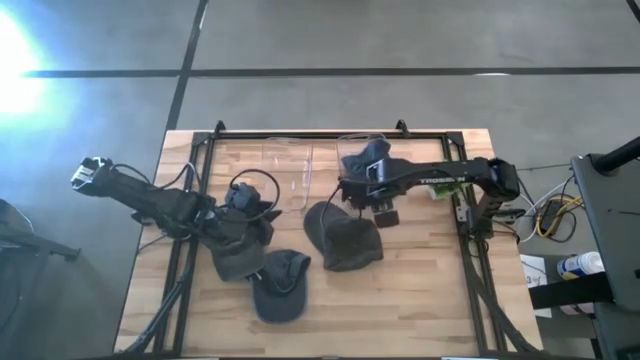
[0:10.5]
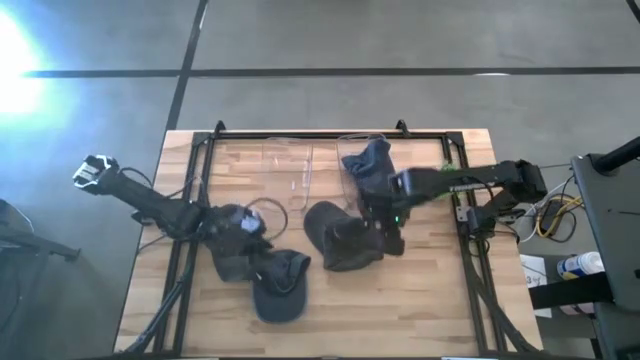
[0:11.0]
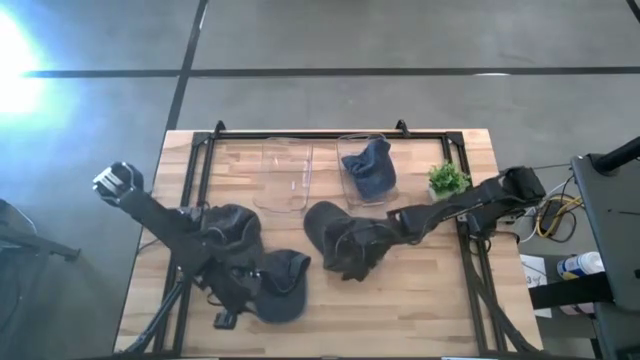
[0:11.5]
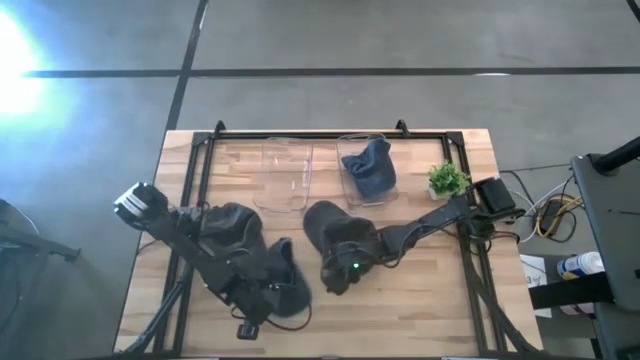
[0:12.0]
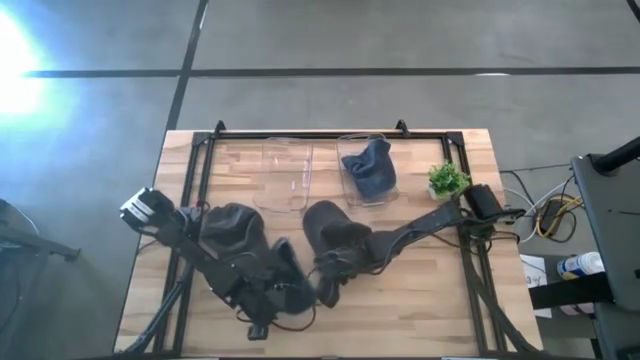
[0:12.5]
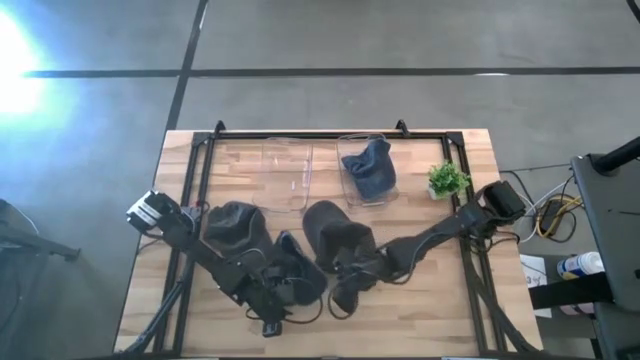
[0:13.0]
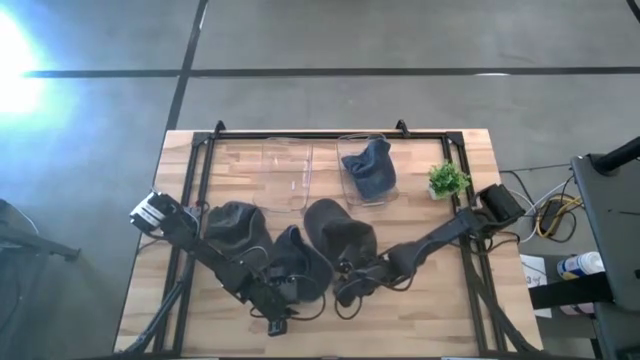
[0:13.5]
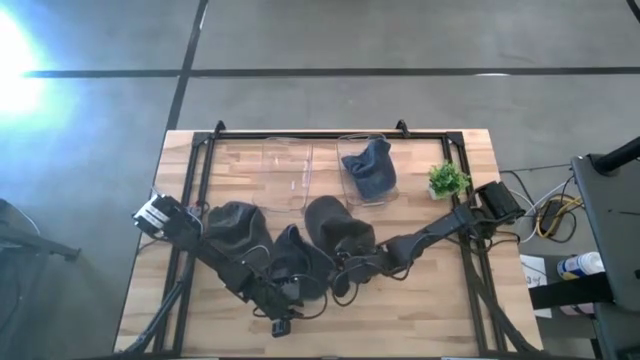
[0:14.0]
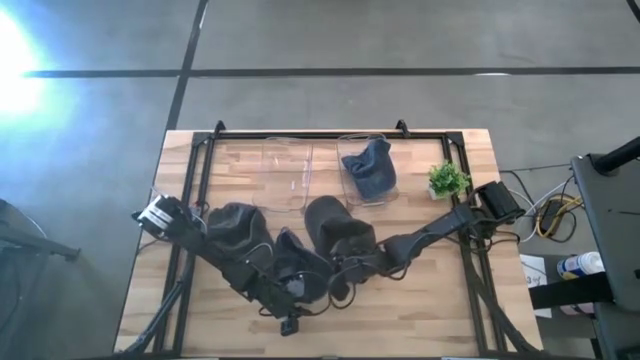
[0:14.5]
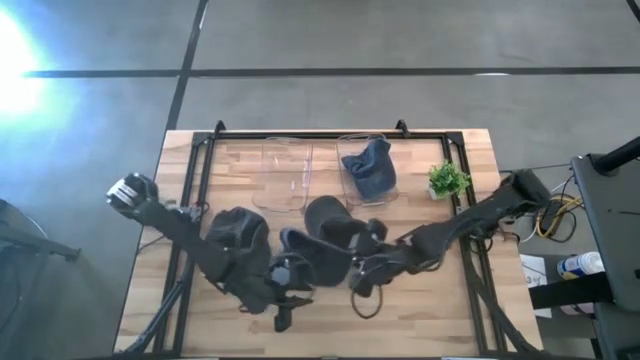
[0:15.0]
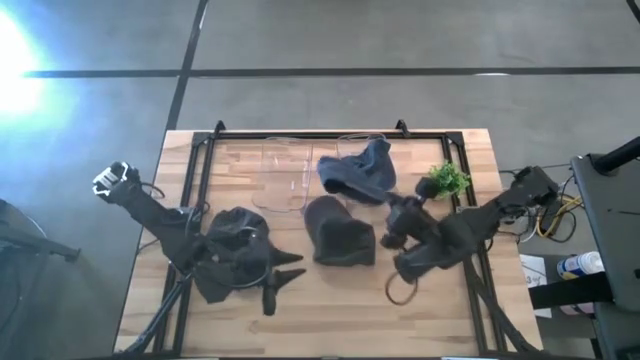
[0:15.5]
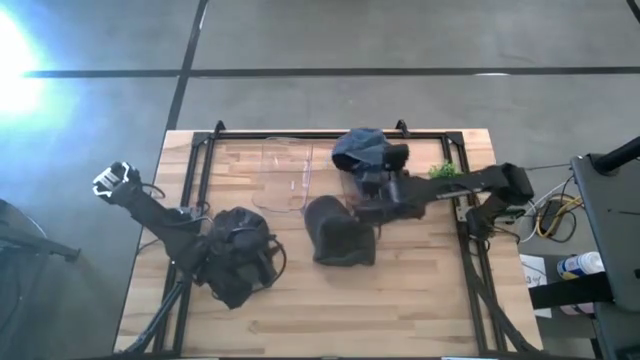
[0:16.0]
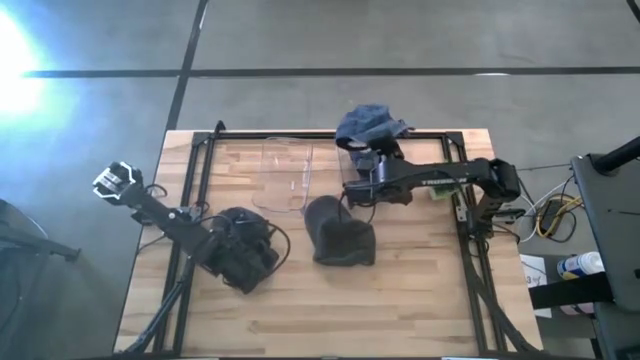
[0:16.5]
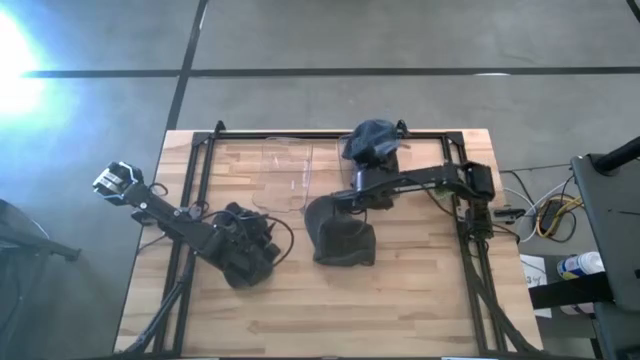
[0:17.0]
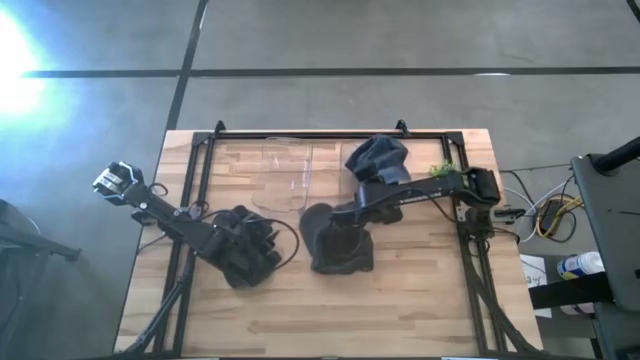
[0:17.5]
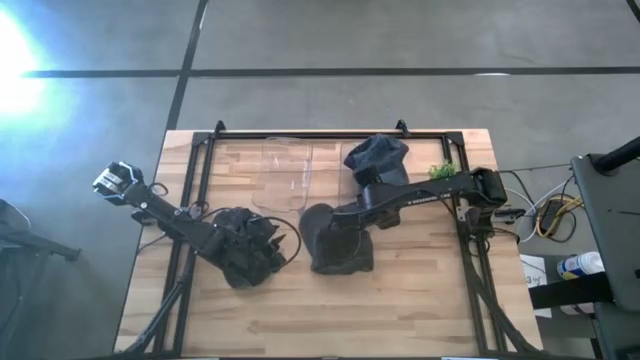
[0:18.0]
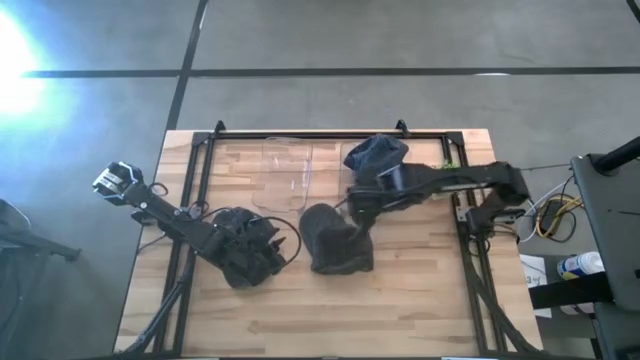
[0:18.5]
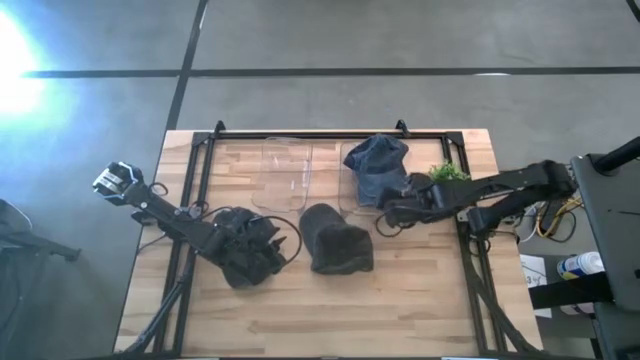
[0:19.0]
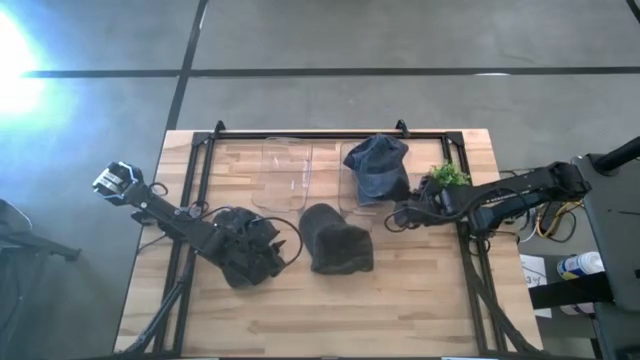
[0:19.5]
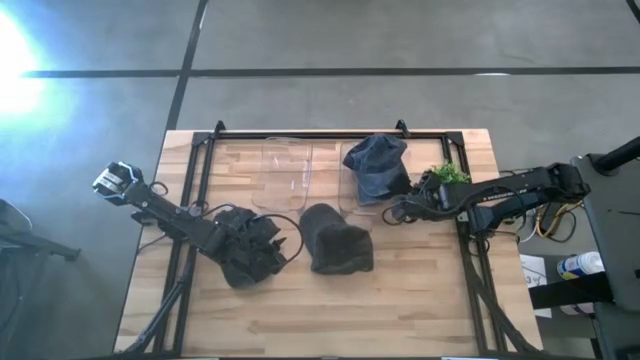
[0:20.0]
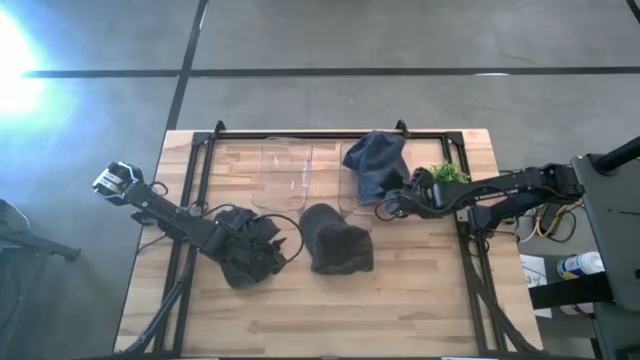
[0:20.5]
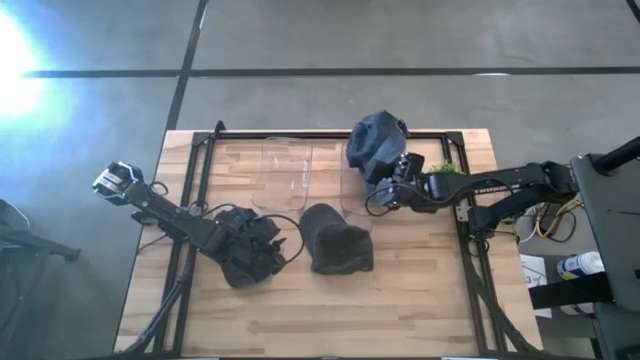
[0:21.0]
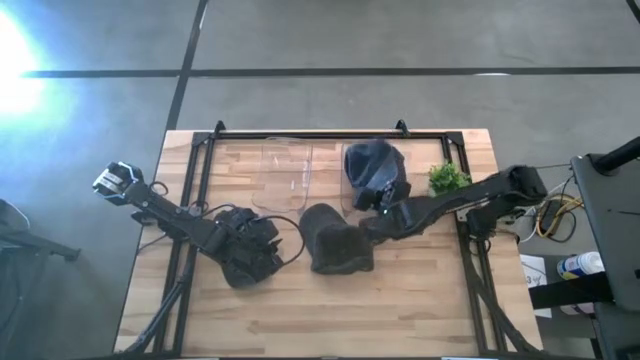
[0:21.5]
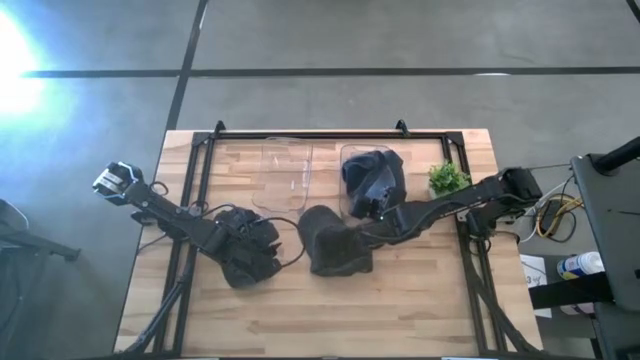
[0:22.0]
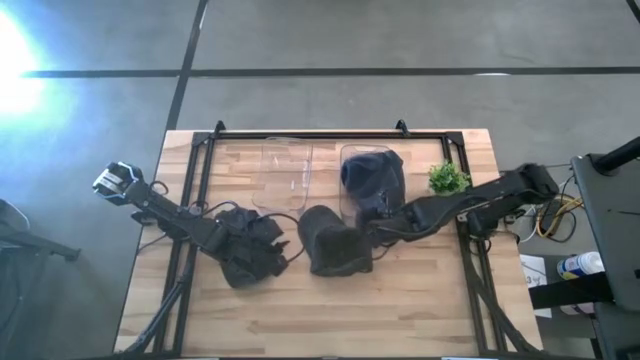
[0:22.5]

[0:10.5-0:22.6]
Task: Pick & Place hat
Put the blue cap into the right transparent bin

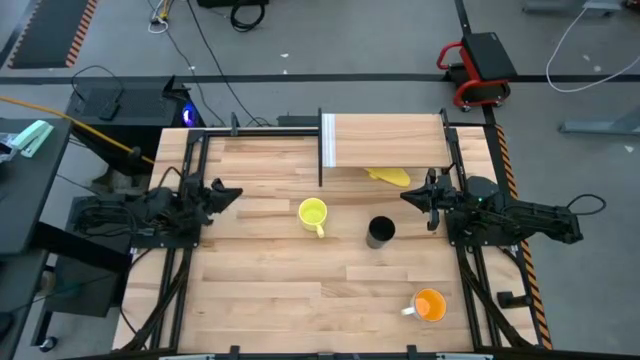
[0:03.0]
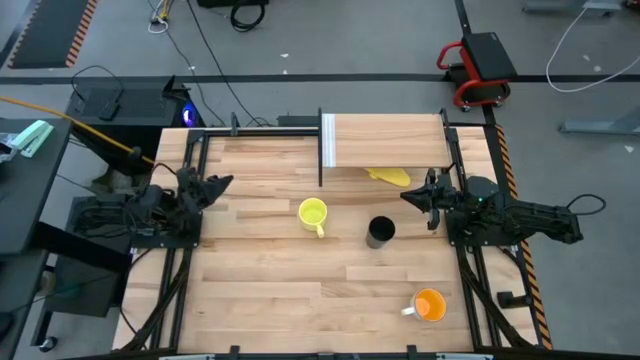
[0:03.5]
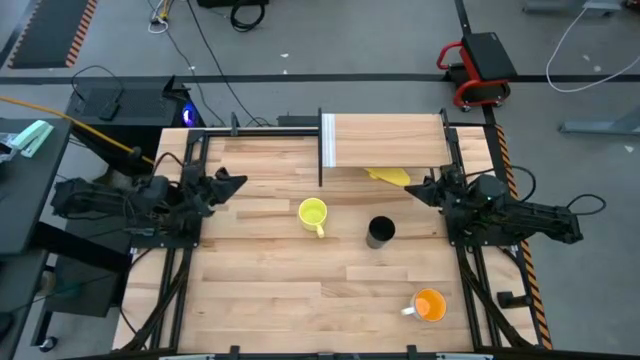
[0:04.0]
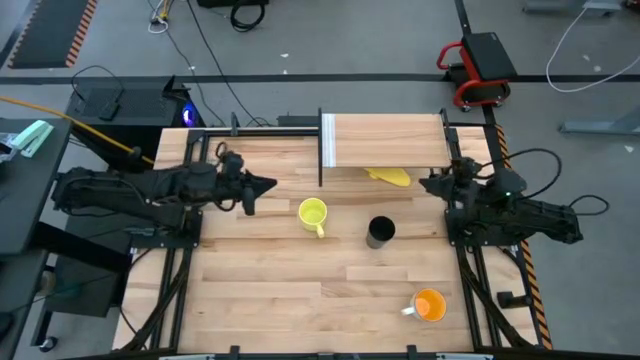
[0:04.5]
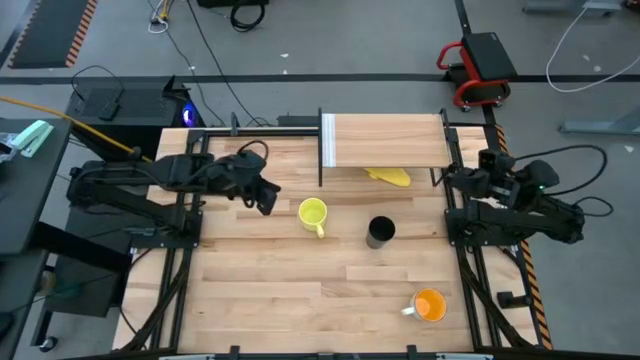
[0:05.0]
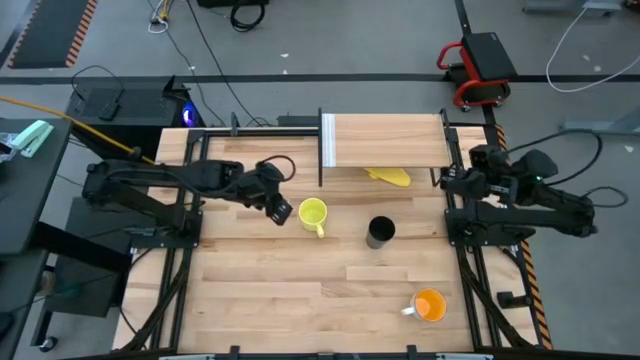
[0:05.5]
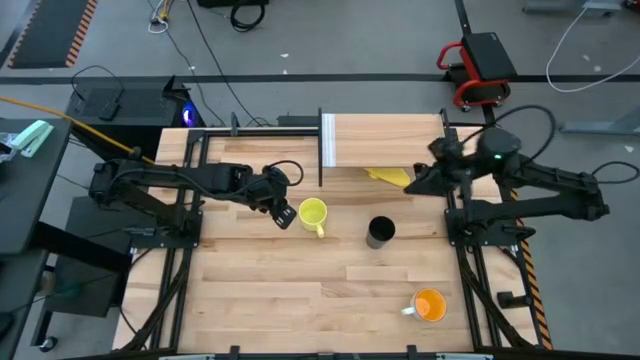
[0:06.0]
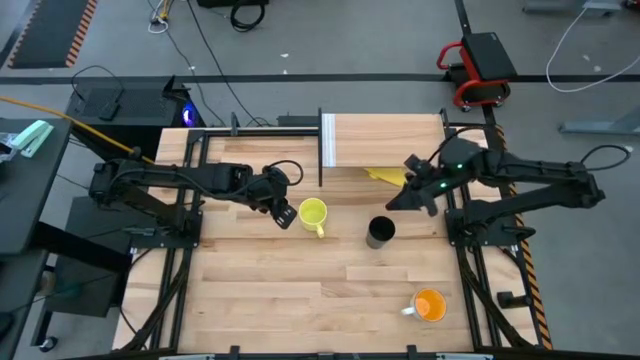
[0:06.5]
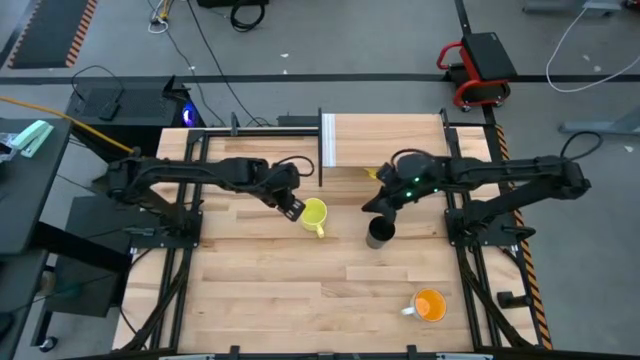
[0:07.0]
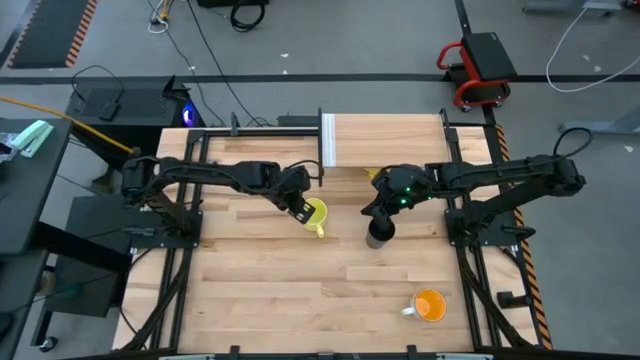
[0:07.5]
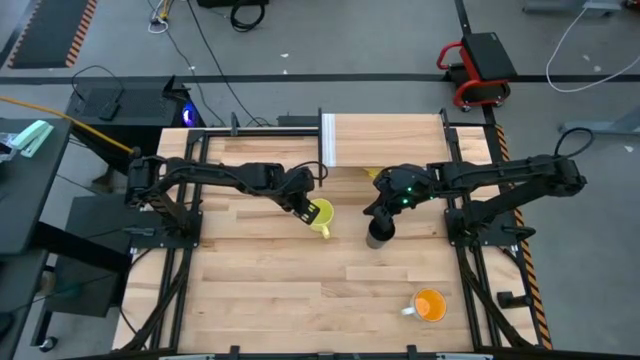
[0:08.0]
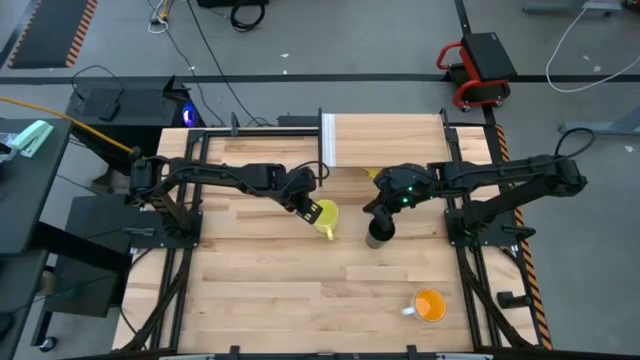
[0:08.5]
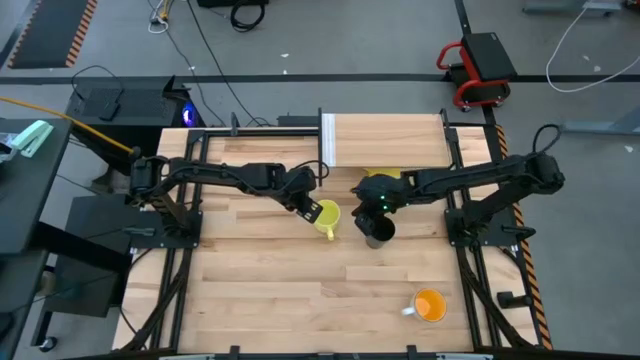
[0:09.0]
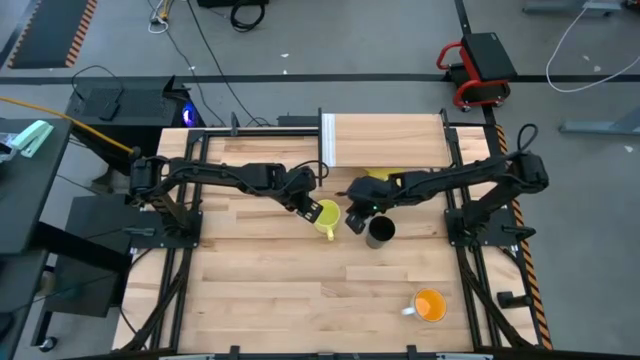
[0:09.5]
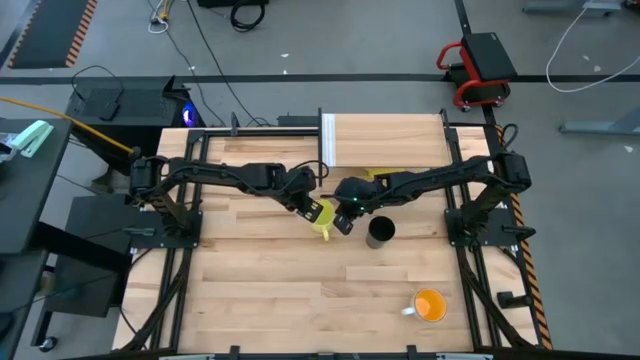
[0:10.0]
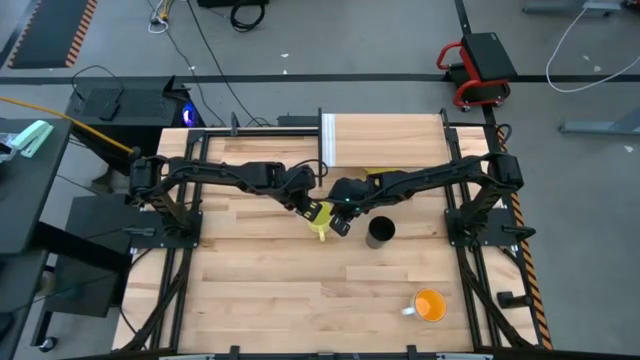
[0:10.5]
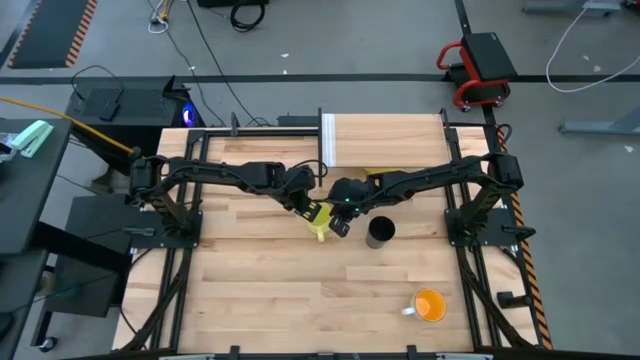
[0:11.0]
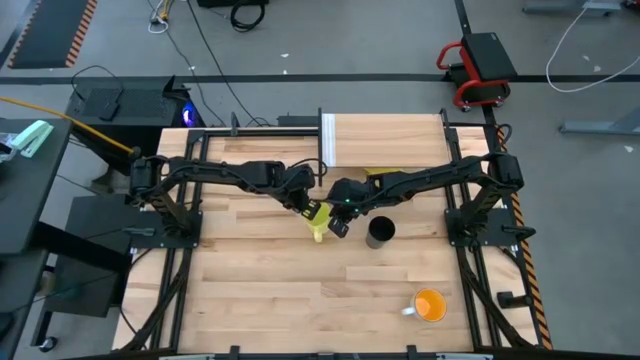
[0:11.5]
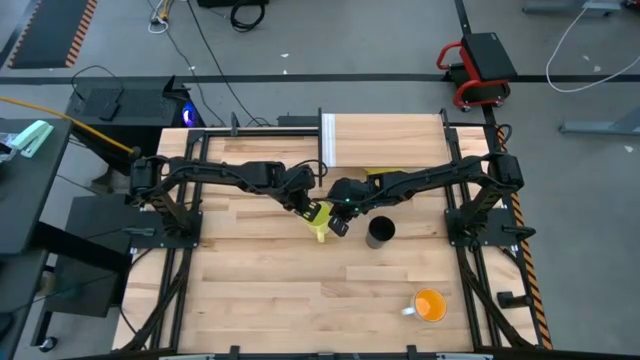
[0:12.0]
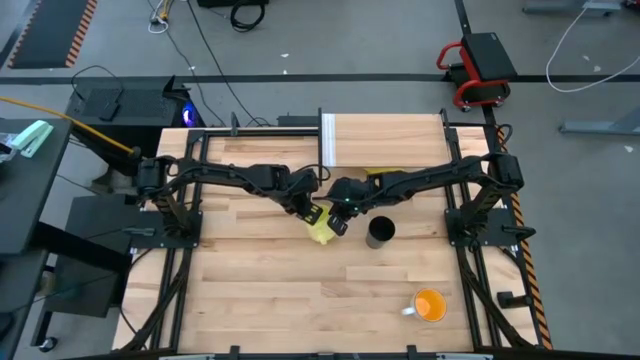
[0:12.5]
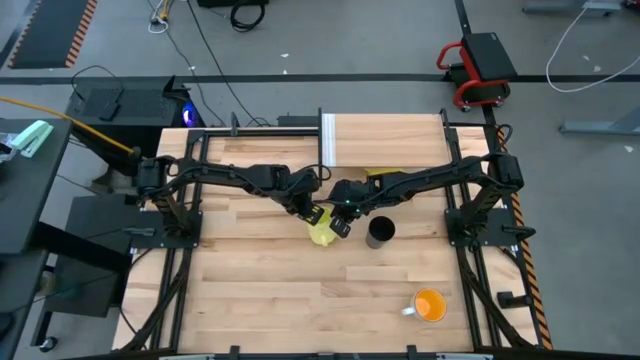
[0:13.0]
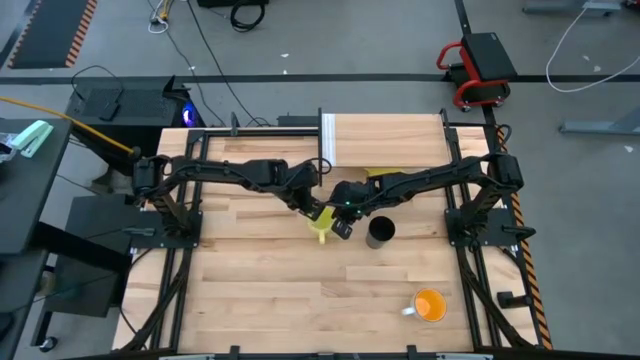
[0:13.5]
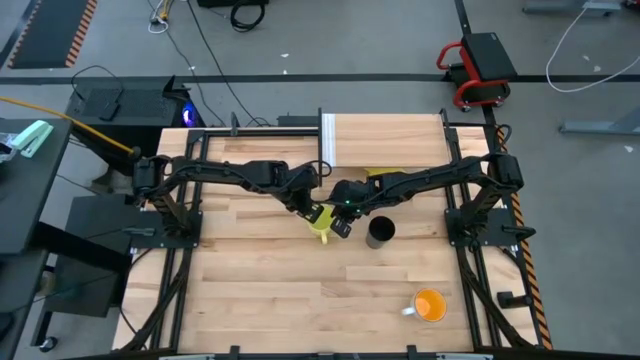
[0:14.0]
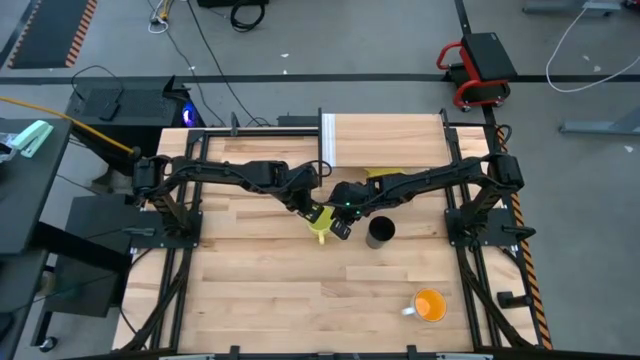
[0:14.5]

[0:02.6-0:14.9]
Task: Stack small to large cups/mugs on shelf
Put the yellow mug on the shelf
